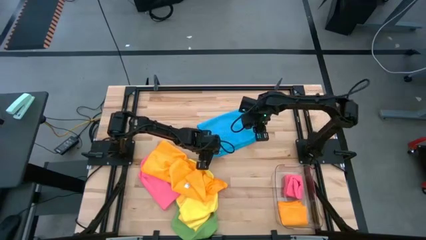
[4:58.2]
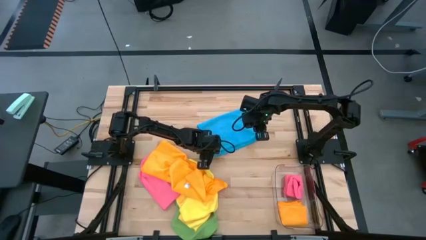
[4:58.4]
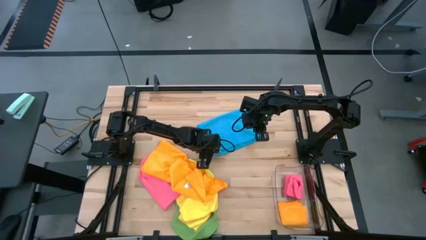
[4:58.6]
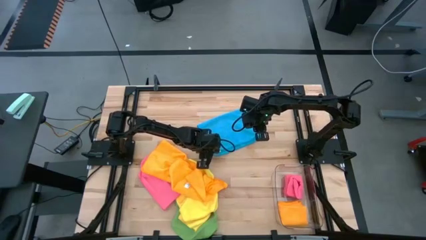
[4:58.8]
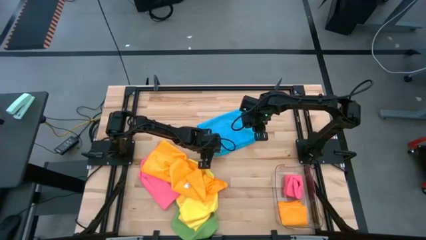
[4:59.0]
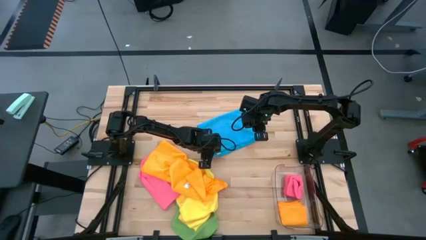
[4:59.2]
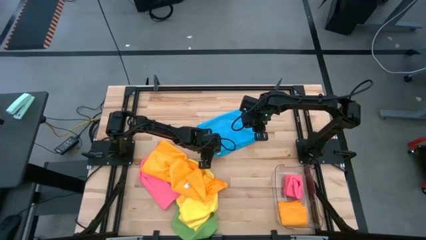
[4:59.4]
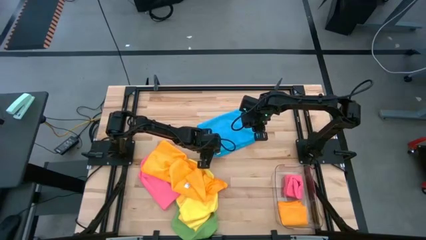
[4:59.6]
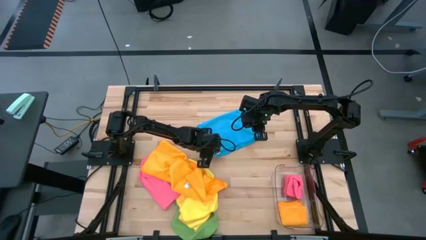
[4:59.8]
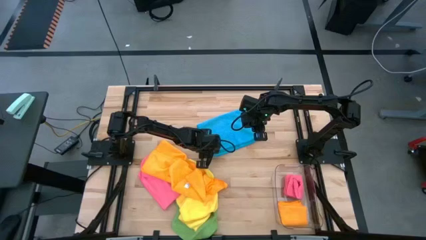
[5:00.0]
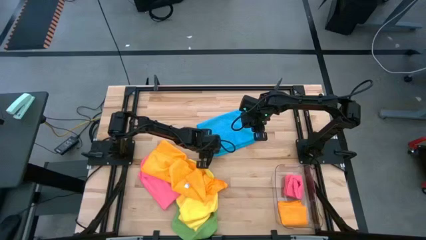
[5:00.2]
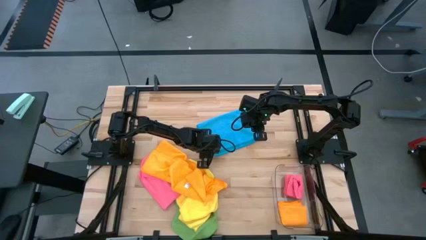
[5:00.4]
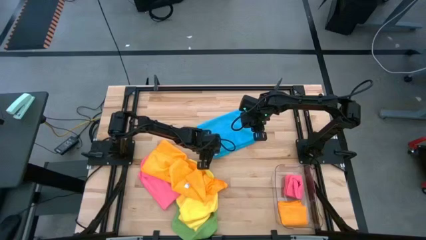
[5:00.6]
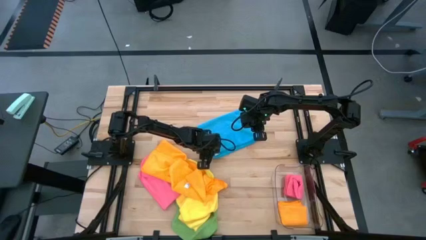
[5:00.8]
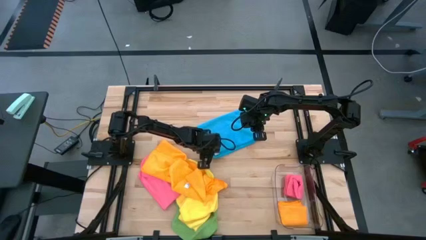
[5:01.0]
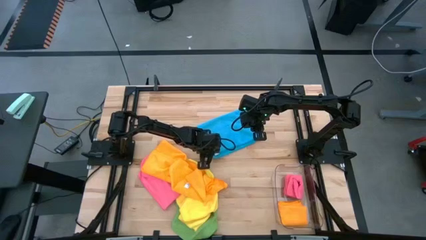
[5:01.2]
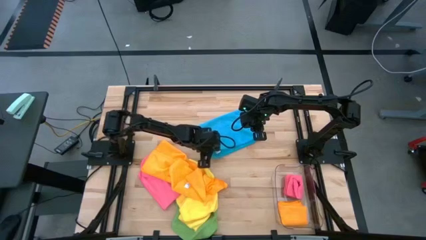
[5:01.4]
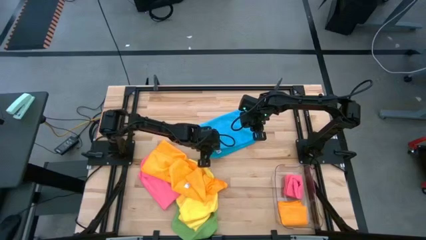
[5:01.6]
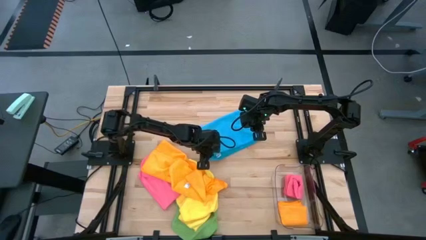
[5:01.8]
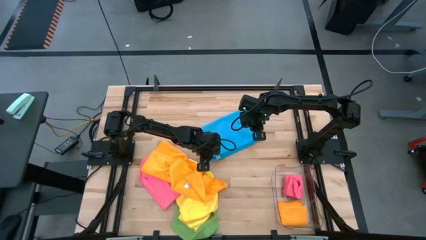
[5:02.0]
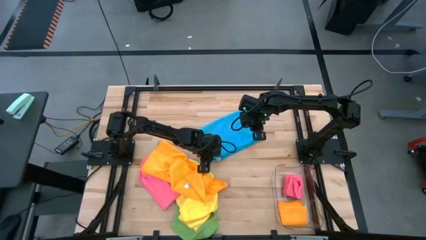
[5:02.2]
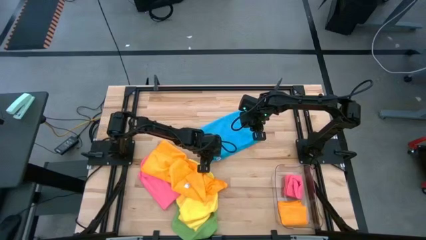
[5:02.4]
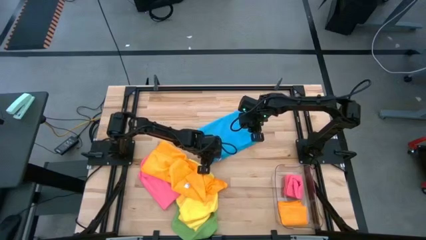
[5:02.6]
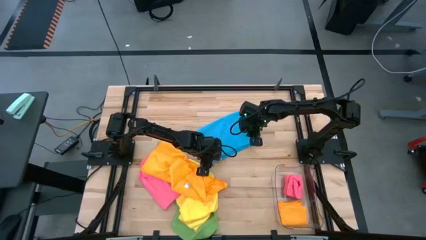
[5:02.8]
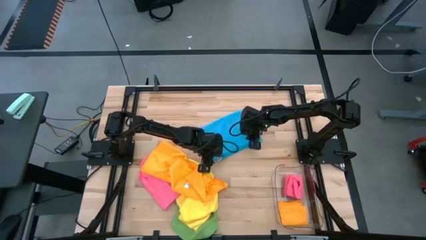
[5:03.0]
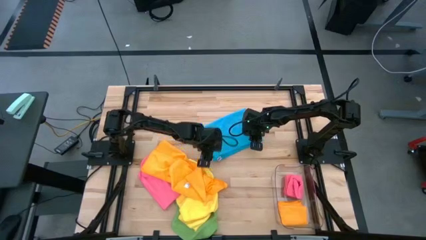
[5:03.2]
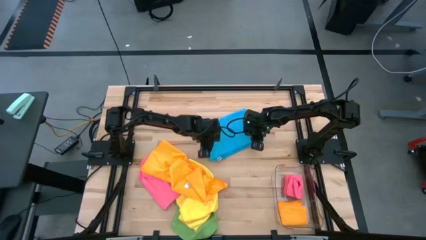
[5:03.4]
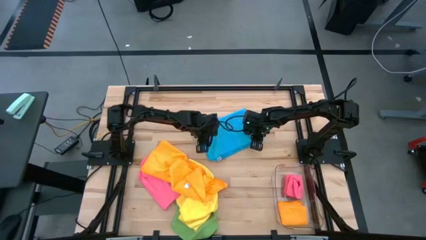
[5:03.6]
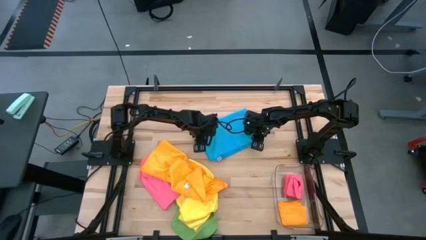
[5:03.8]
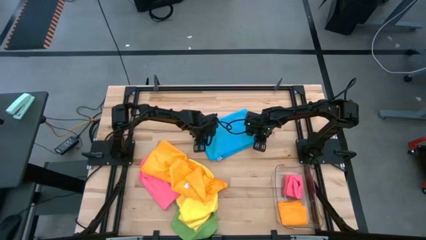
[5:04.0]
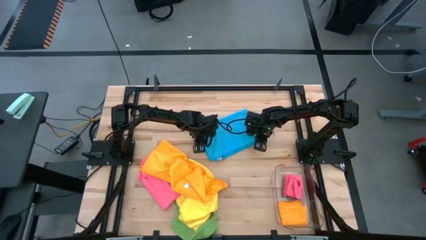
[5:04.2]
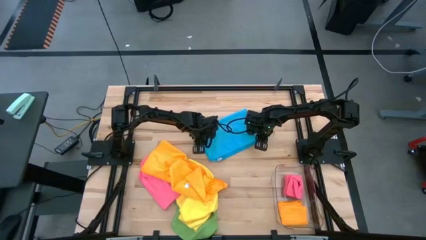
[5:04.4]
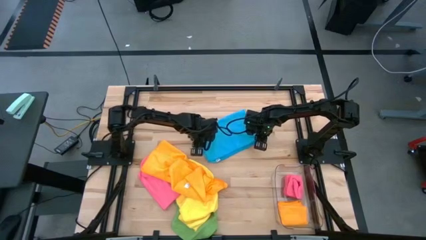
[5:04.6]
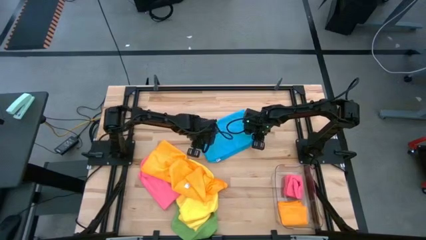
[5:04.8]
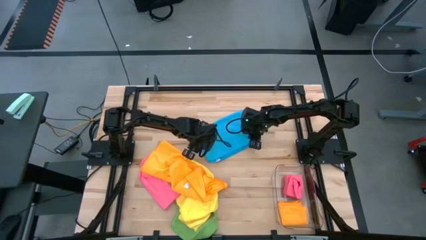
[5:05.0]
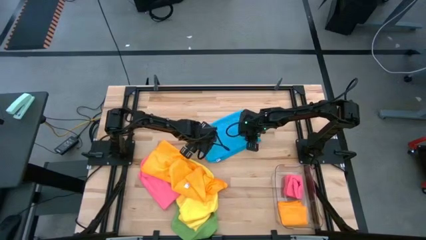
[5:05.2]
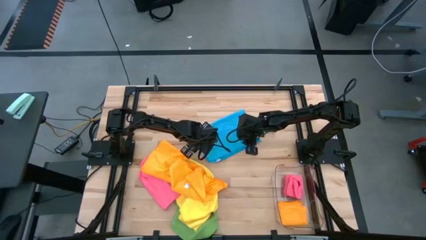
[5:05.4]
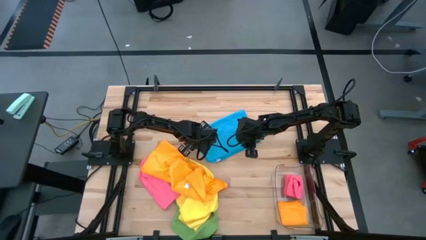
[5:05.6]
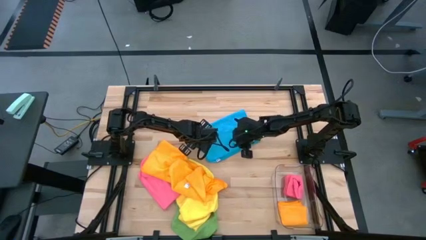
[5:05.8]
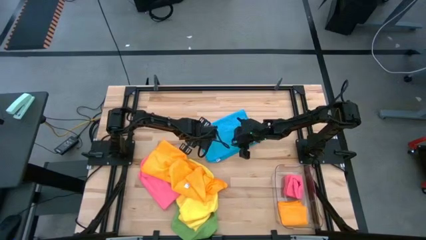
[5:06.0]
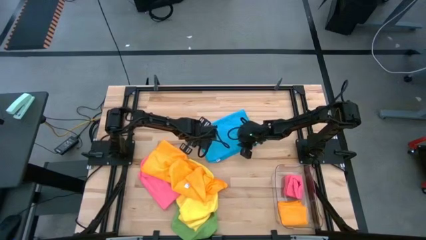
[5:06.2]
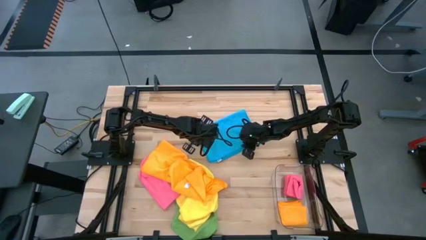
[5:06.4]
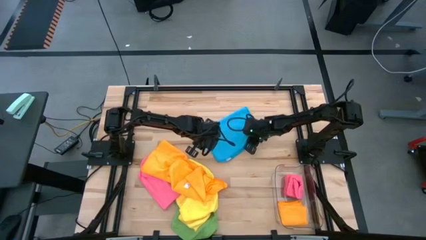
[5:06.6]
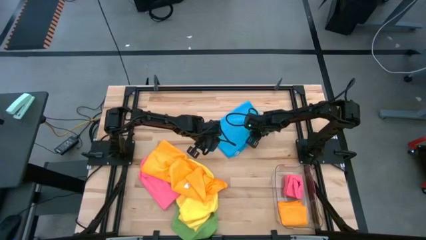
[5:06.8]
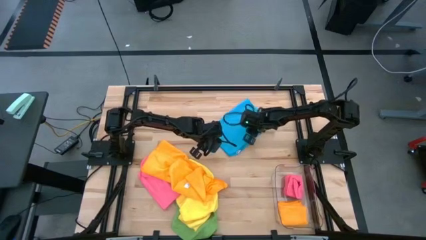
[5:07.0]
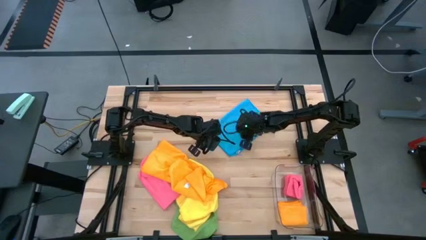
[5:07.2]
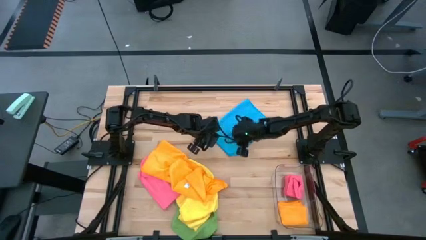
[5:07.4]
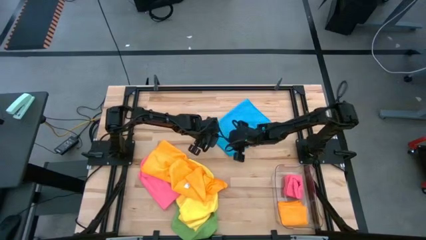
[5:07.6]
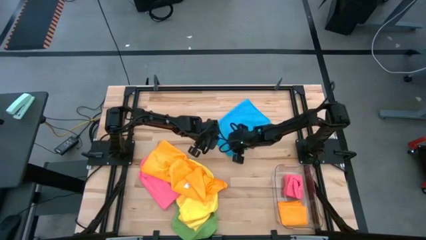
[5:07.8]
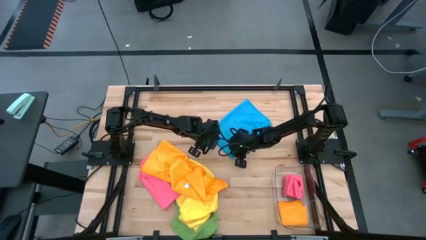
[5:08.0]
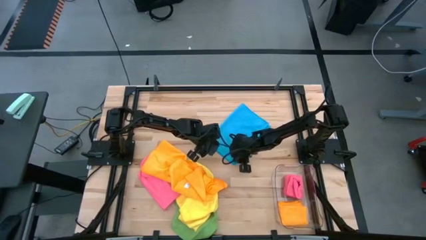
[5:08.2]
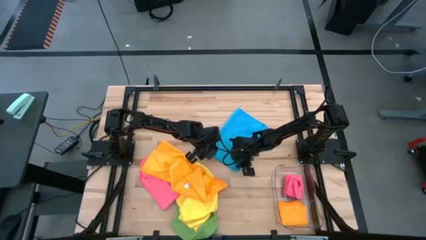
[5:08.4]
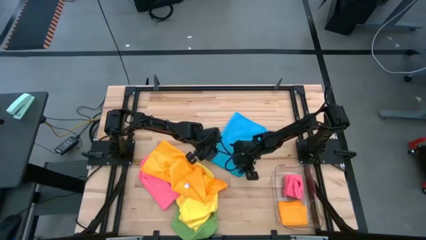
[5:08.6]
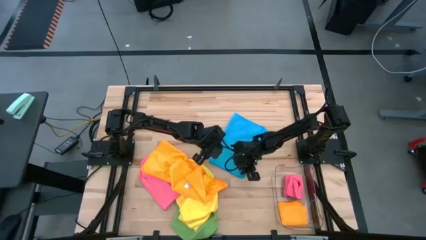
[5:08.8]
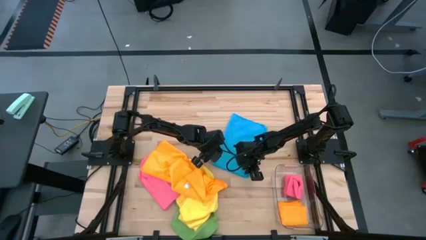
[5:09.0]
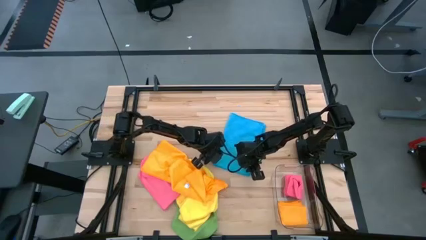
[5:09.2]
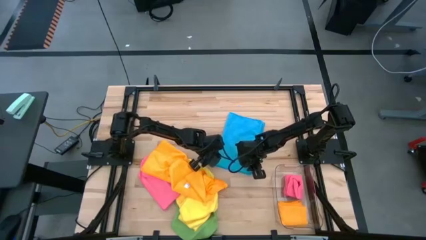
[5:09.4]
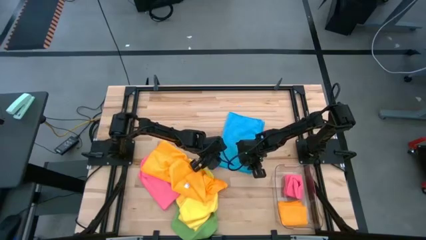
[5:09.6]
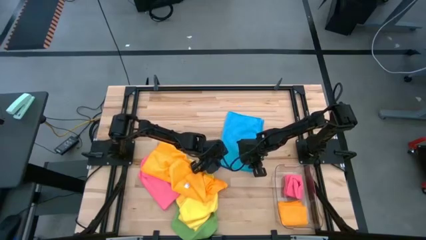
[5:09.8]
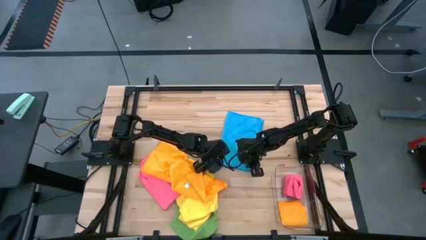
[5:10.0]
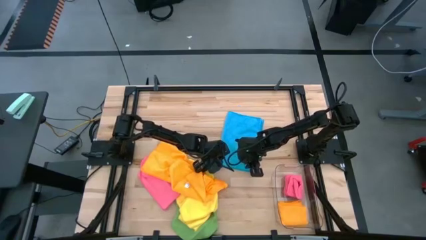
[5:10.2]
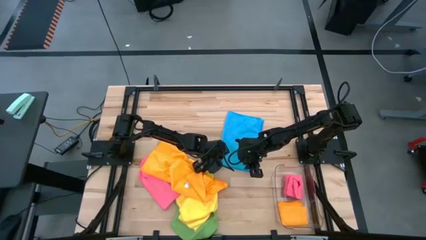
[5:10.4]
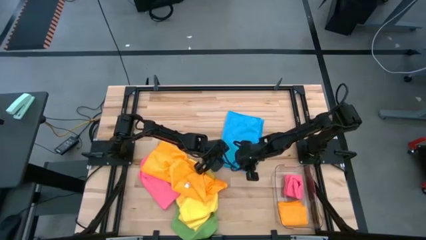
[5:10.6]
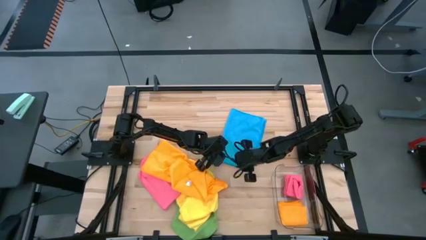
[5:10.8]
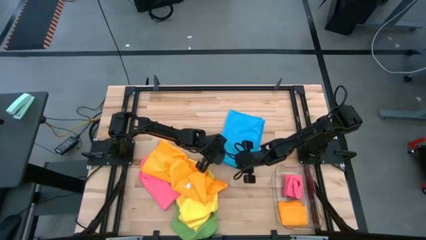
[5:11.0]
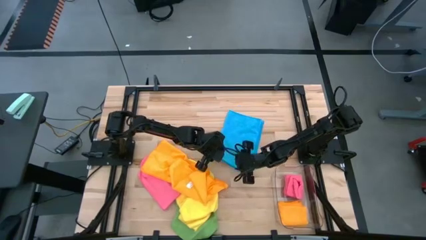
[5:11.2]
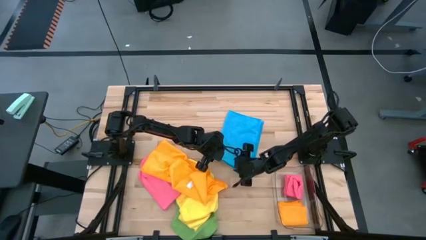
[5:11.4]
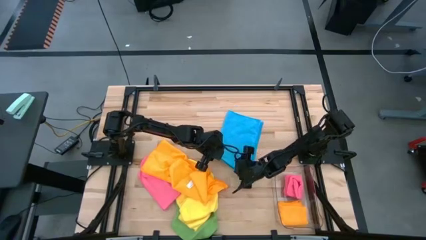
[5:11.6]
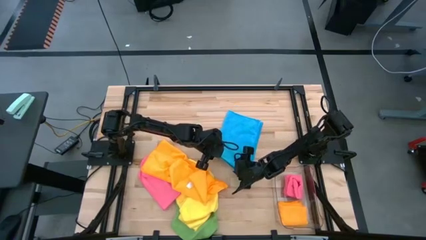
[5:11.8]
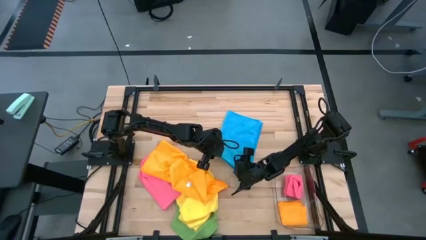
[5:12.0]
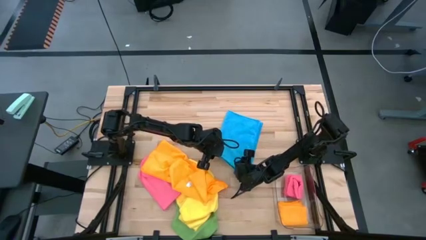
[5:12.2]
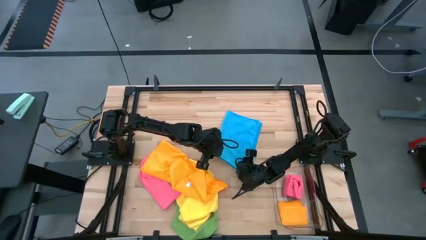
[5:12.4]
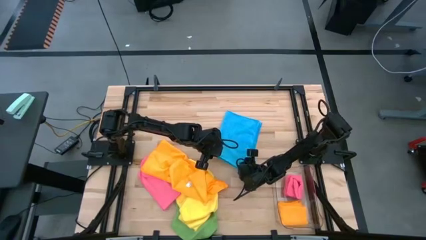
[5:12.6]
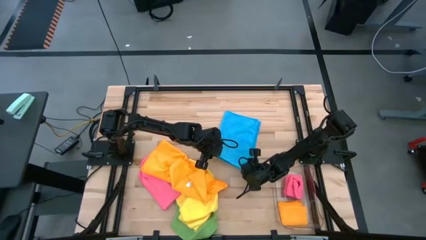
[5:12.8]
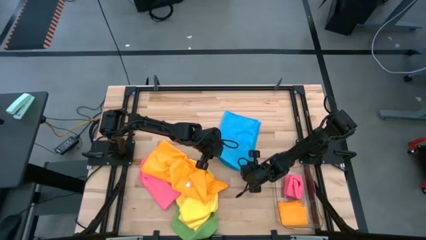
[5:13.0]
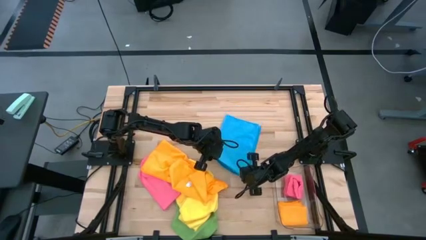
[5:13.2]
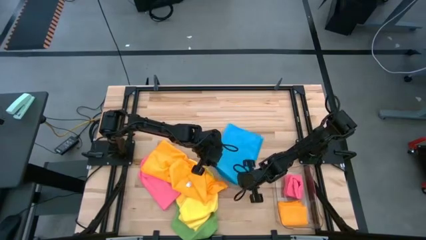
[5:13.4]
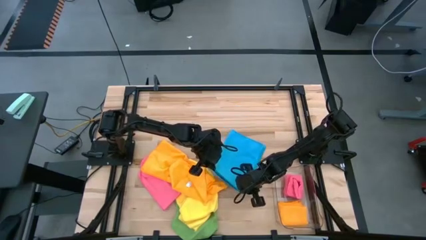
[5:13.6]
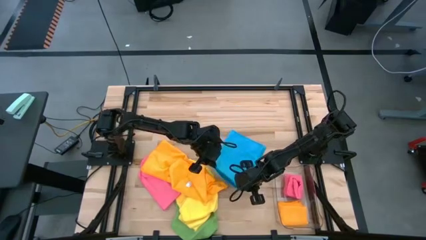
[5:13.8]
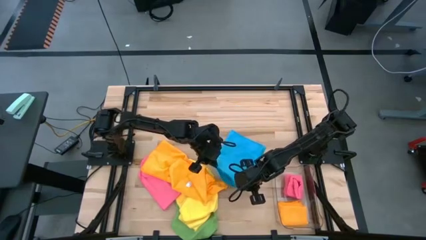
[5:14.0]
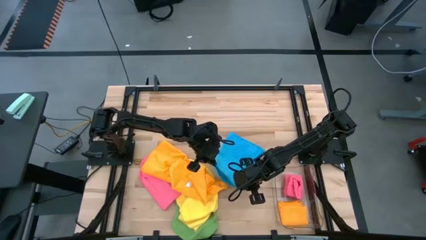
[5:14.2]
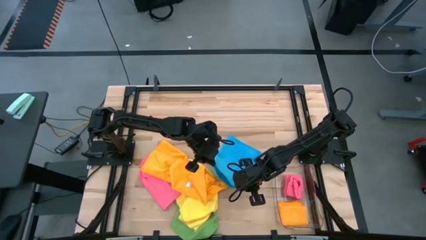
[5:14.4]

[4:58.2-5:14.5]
Task: Fold microfiber towels
Fold the blue towel
